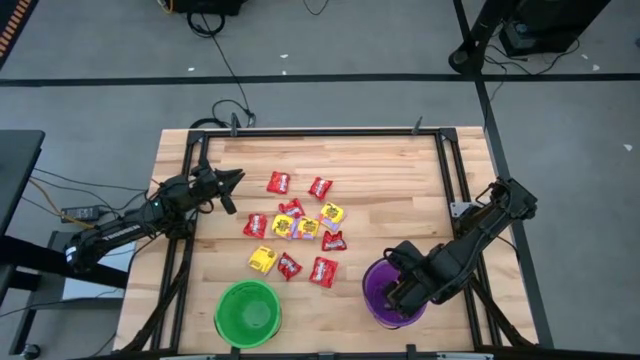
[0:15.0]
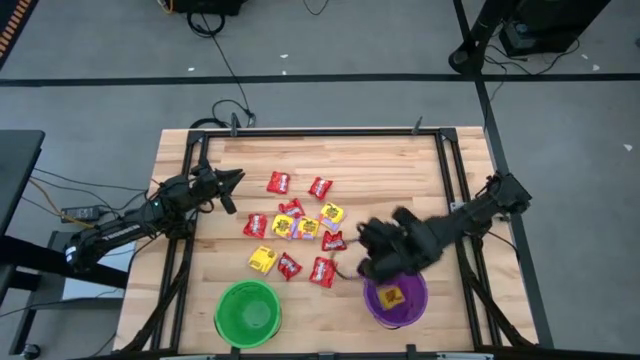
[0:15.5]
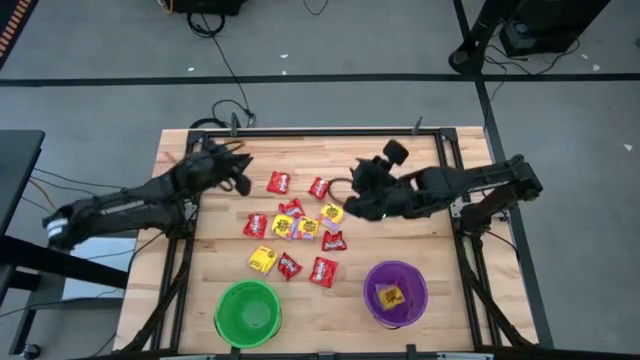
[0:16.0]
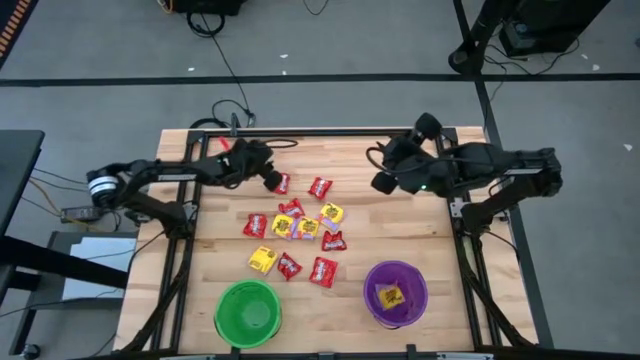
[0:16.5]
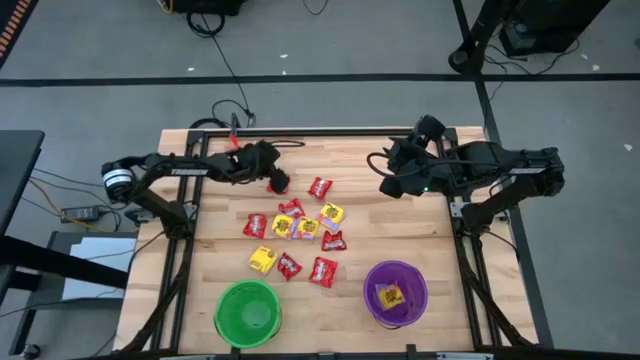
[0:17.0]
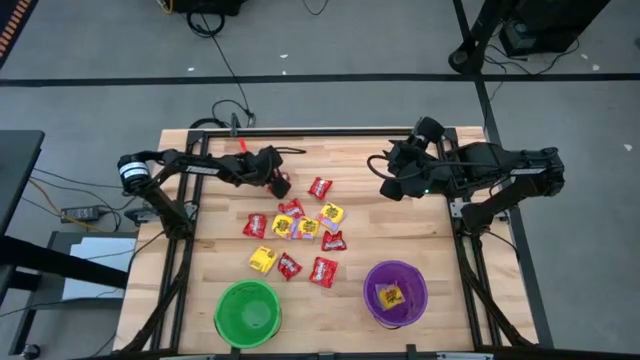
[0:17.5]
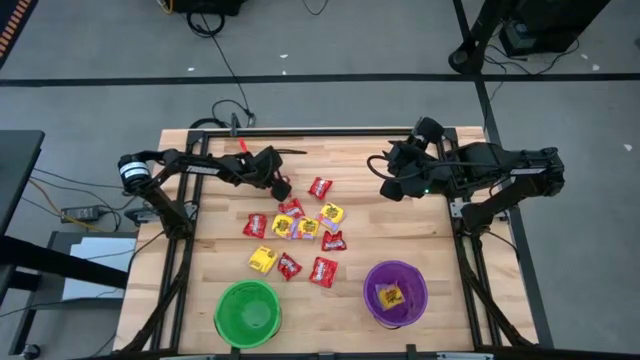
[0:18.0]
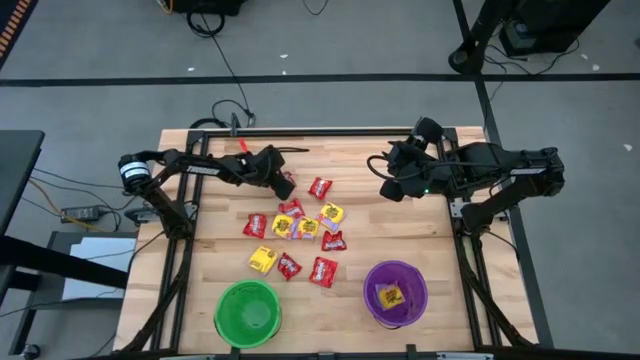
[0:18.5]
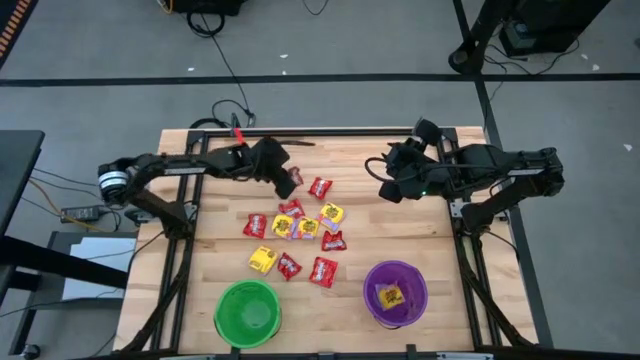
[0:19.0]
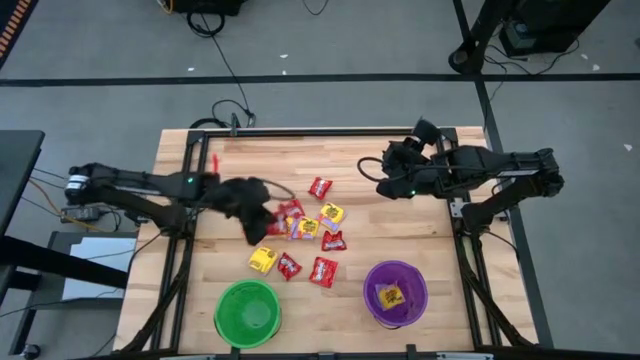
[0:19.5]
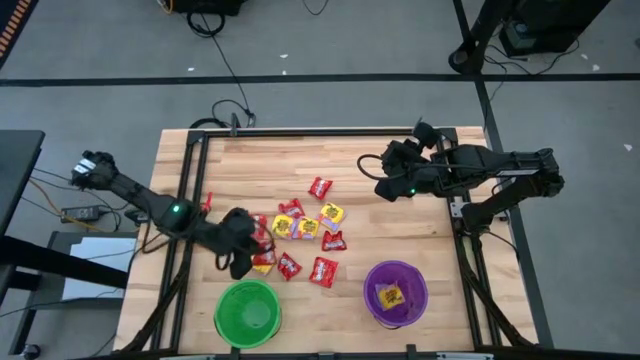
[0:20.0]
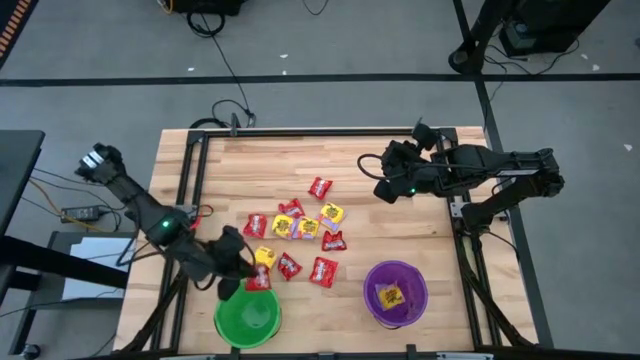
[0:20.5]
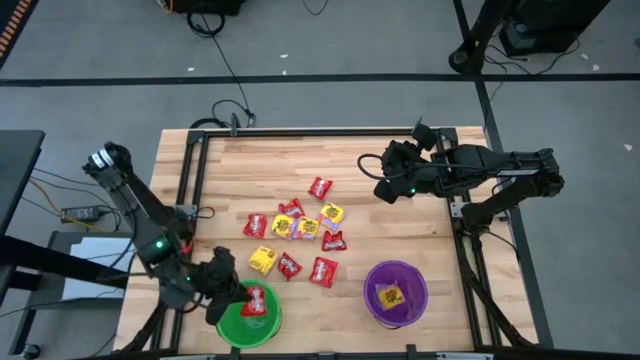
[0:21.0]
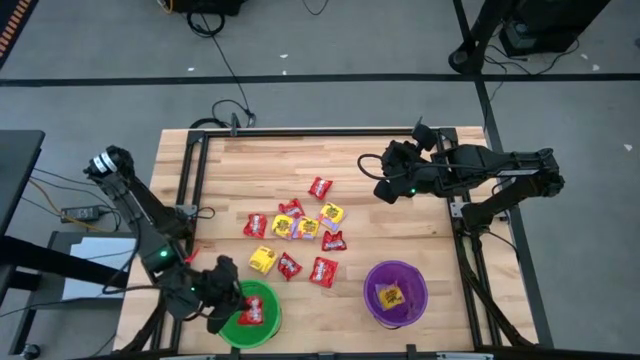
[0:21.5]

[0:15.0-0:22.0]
Task: Sort candy by brand, put in halloween buckets
Put the red candy into the green bucket

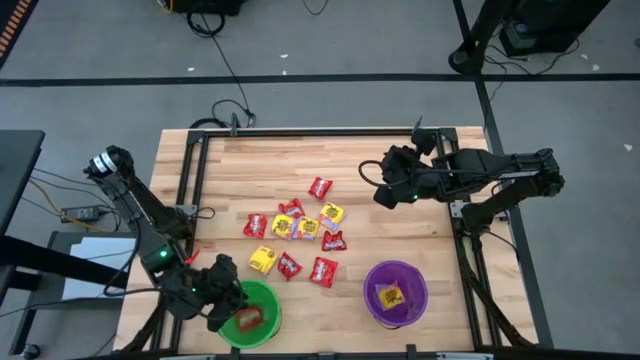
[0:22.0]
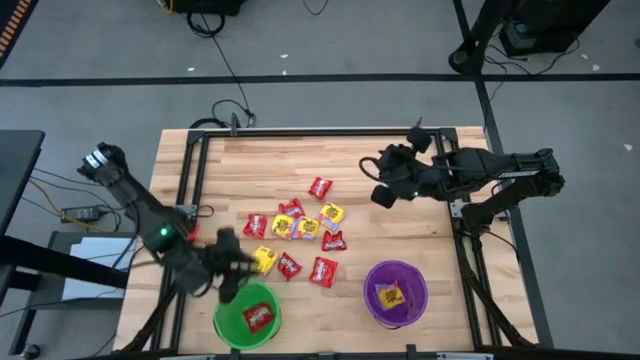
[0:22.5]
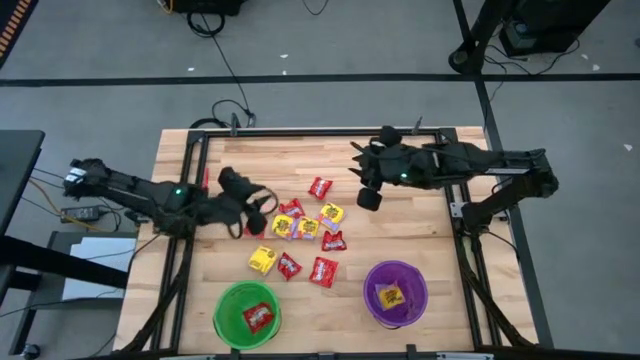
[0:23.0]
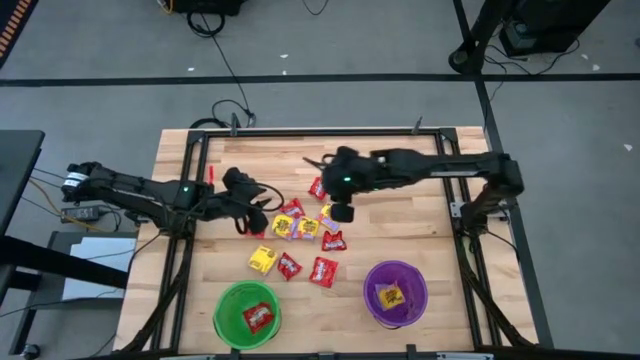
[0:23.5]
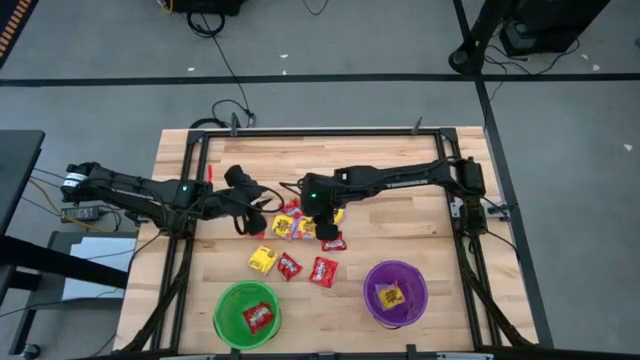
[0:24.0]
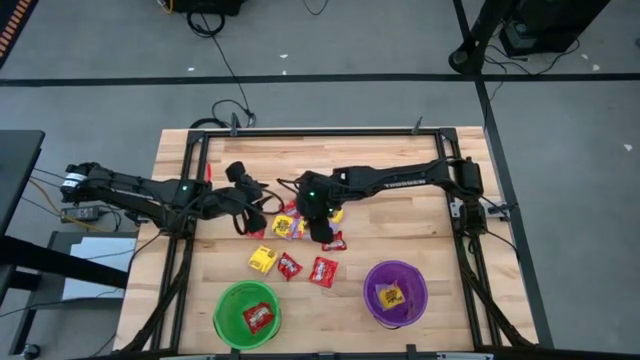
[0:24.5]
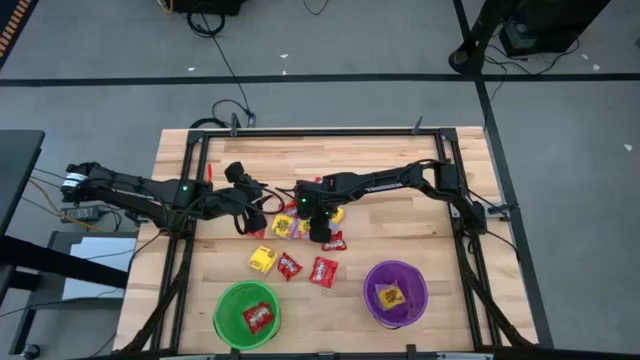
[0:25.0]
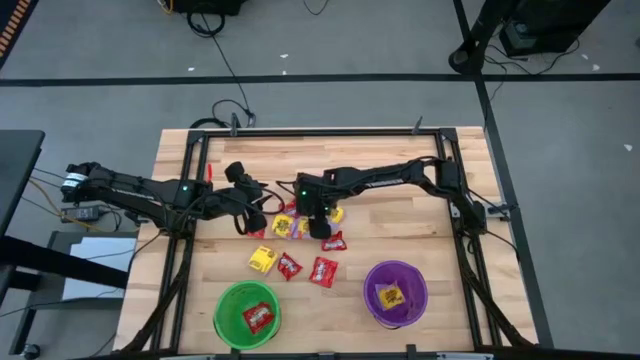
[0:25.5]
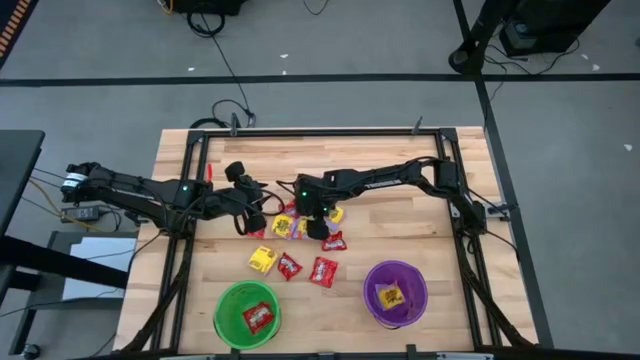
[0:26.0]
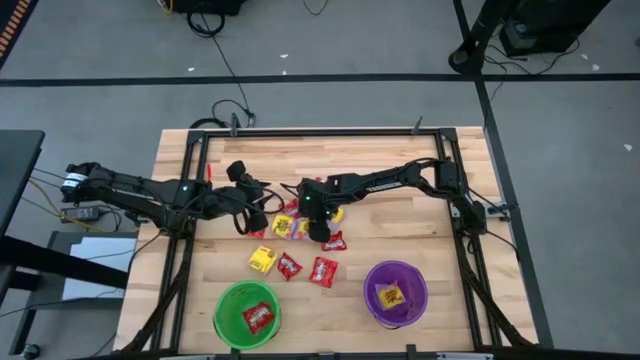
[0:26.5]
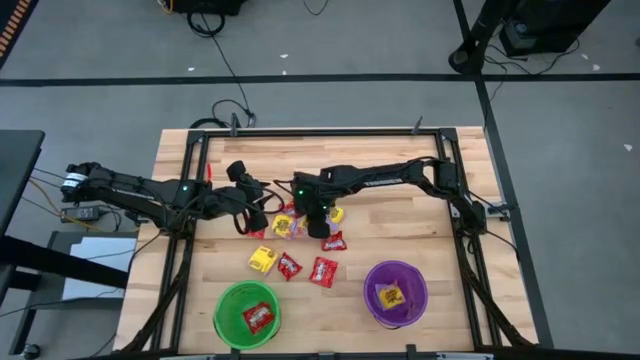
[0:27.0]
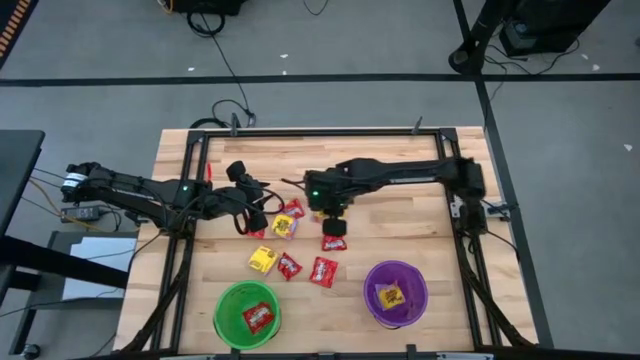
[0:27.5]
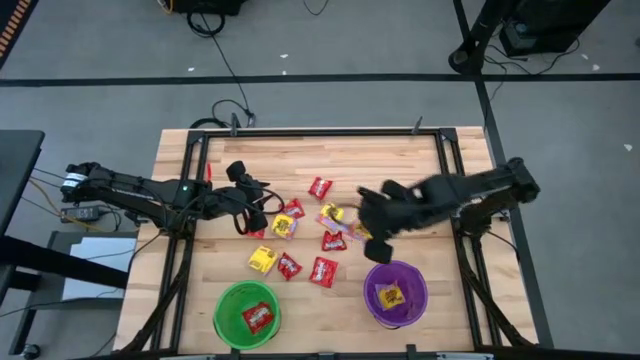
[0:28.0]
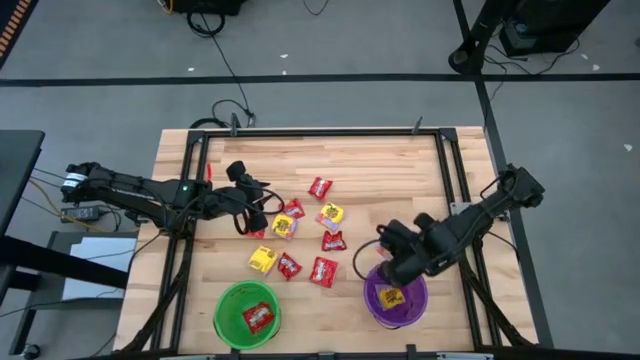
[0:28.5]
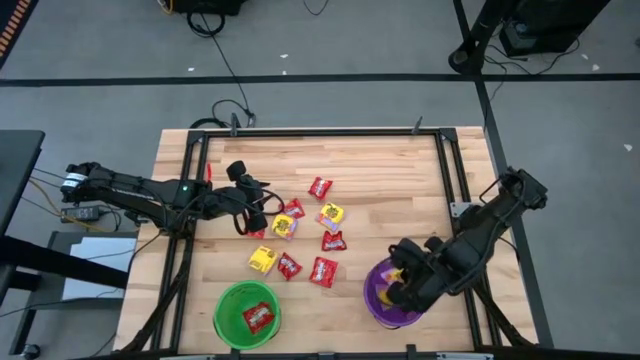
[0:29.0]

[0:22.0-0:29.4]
Put the yellow candy into the purple bucket

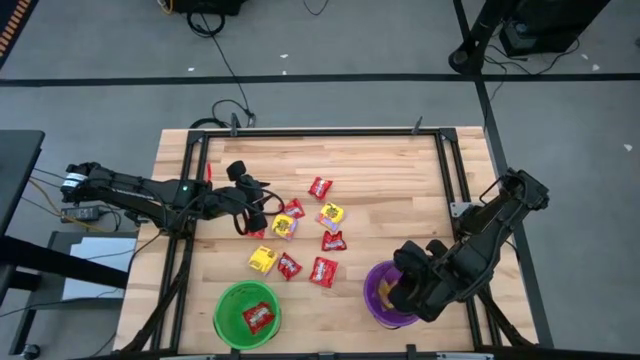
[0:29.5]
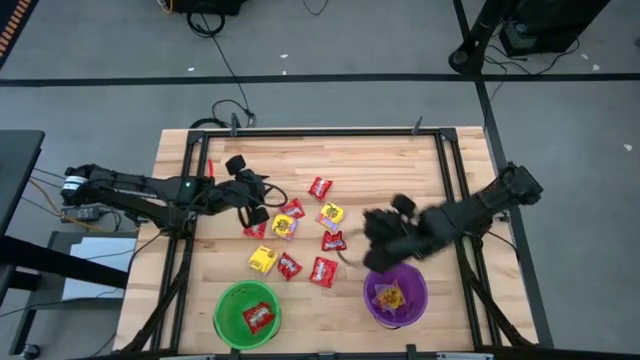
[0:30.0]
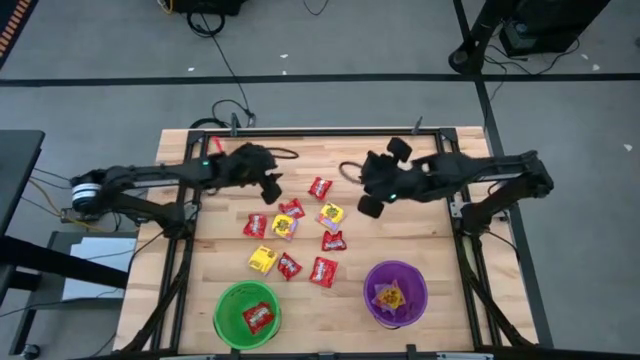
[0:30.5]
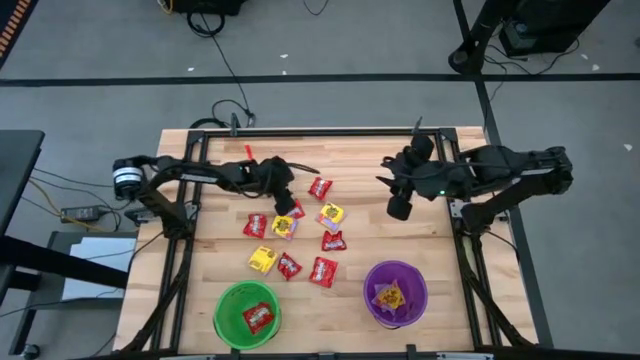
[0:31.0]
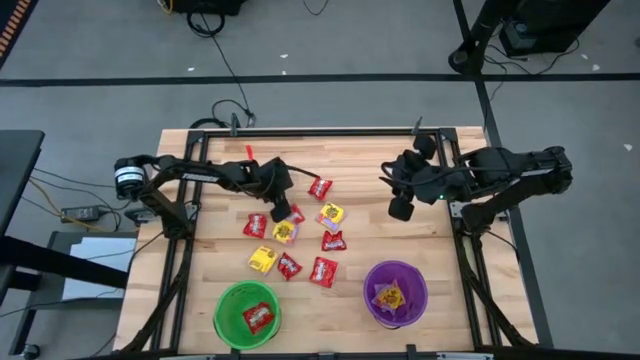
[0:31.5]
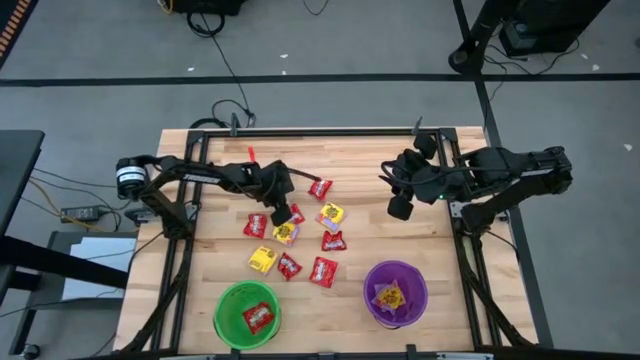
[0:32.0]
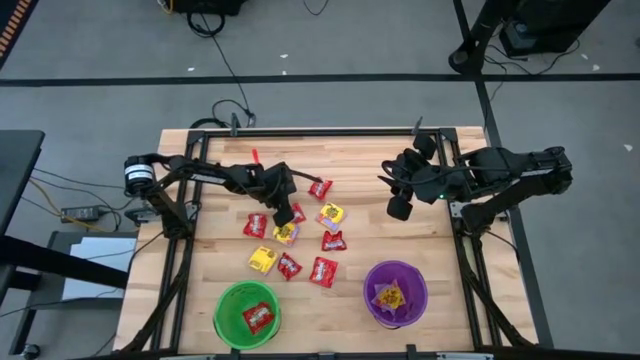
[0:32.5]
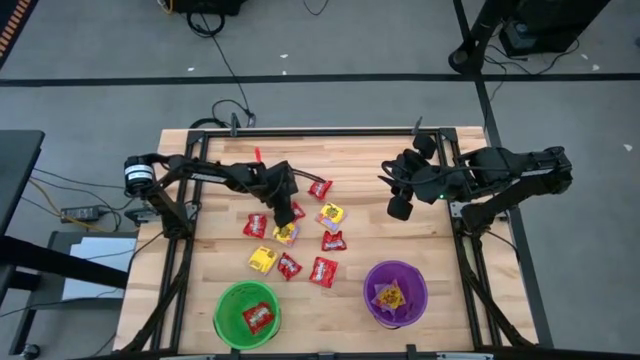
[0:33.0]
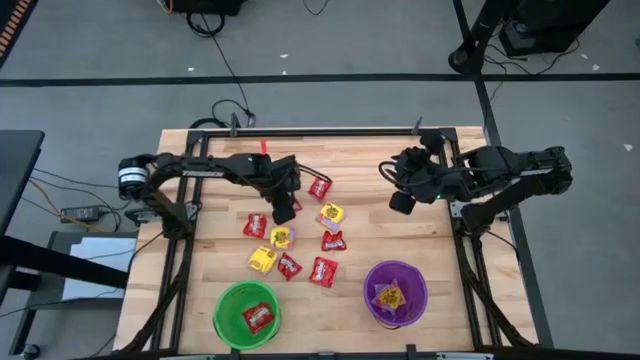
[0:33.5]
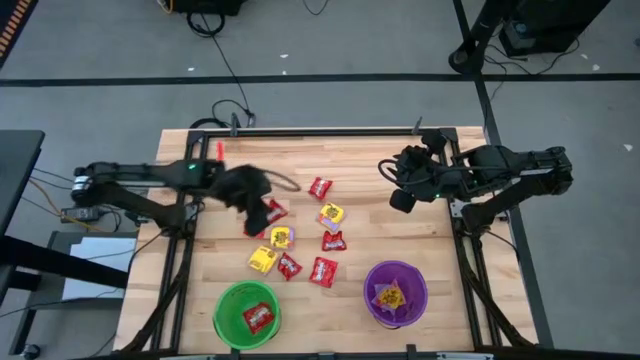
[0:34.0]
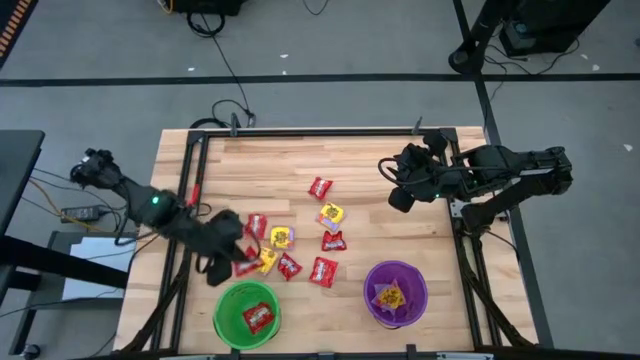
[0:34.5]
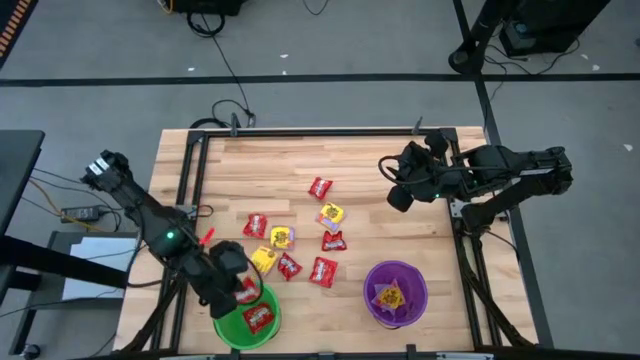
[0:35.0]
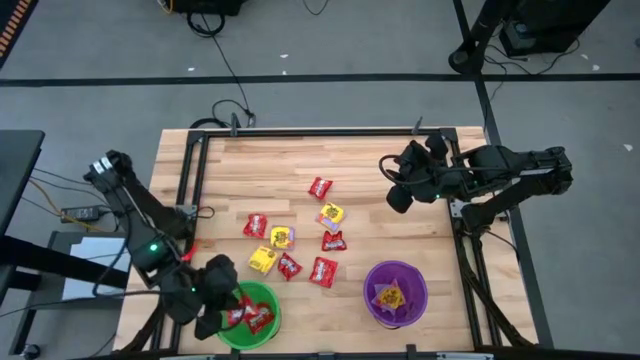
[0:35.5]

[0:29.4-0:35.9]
Put the red candy into the green bucket
